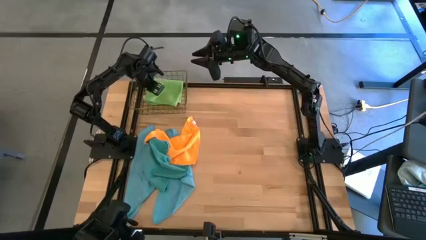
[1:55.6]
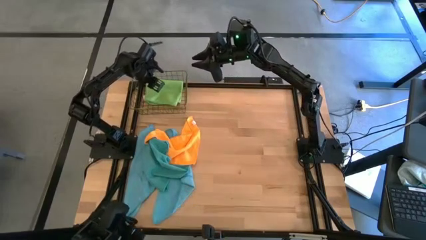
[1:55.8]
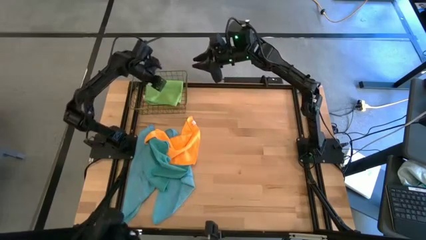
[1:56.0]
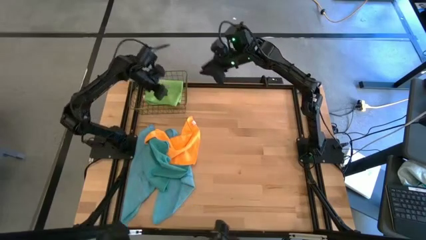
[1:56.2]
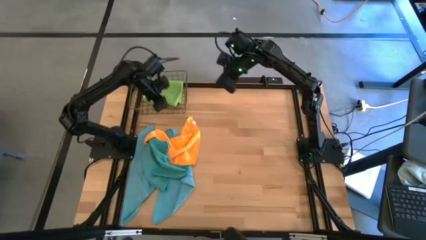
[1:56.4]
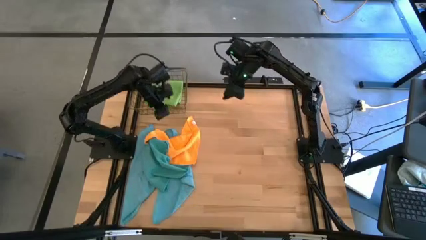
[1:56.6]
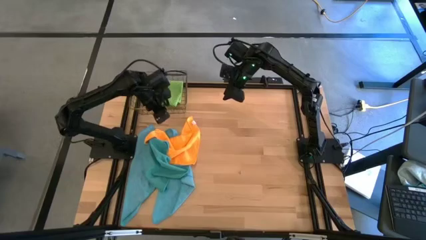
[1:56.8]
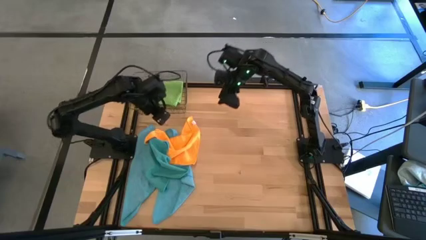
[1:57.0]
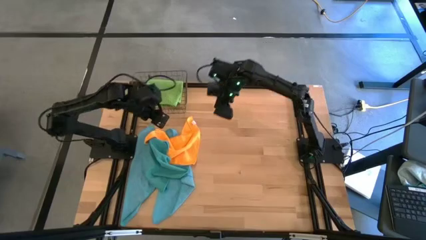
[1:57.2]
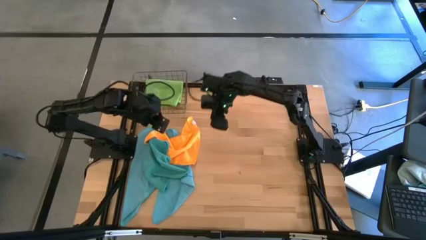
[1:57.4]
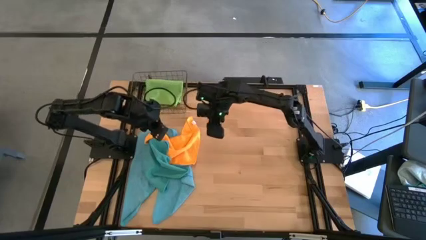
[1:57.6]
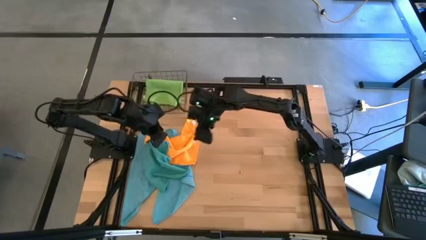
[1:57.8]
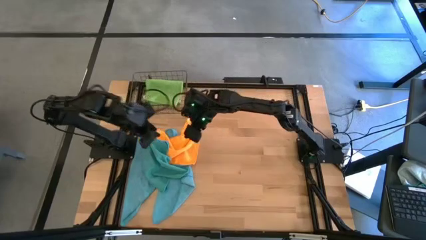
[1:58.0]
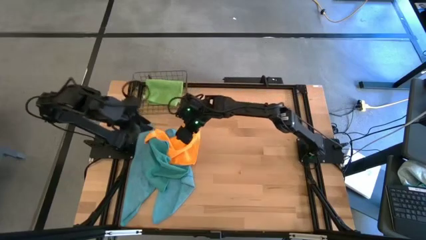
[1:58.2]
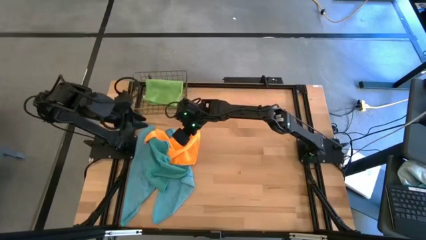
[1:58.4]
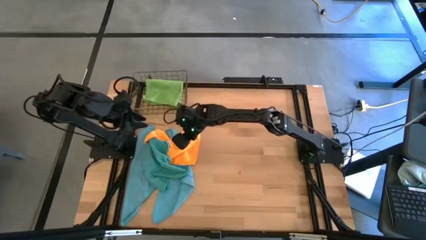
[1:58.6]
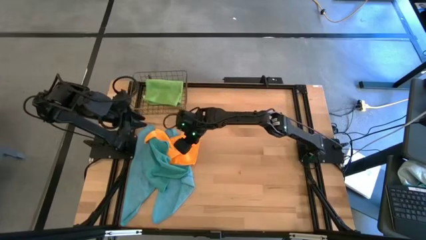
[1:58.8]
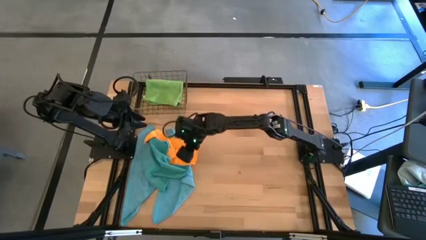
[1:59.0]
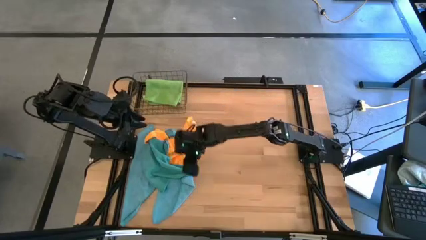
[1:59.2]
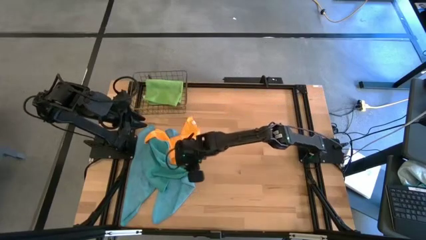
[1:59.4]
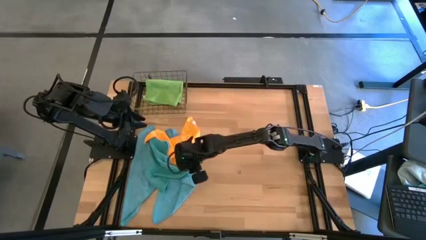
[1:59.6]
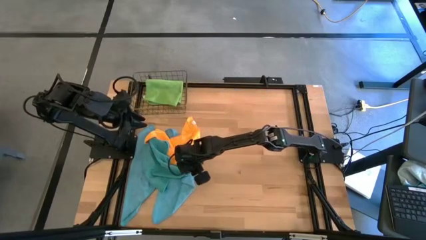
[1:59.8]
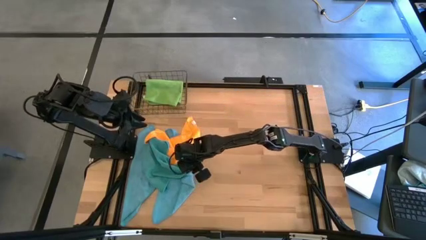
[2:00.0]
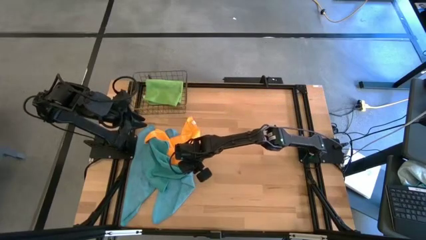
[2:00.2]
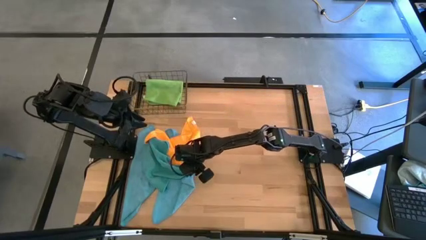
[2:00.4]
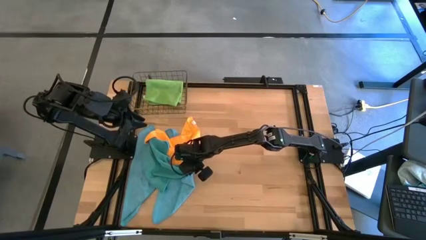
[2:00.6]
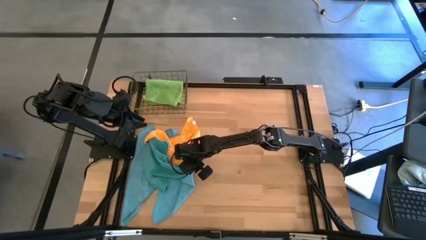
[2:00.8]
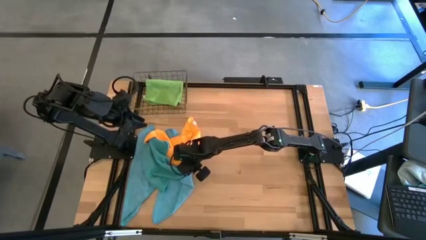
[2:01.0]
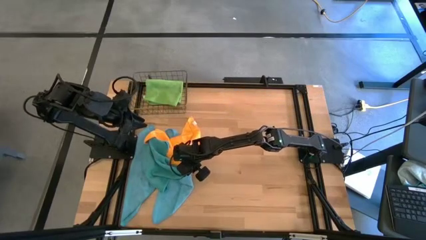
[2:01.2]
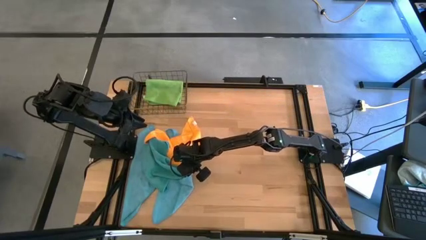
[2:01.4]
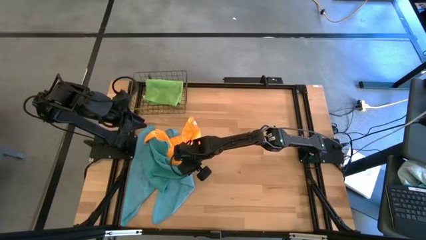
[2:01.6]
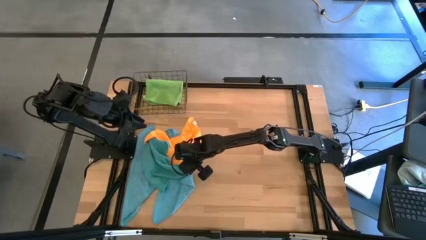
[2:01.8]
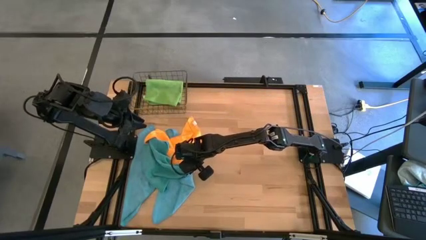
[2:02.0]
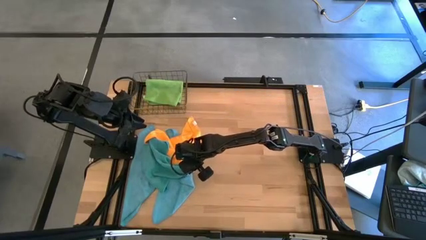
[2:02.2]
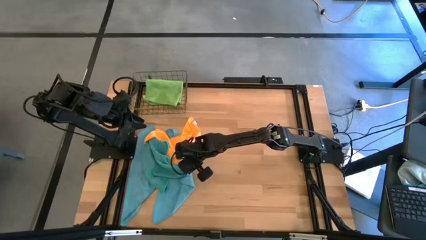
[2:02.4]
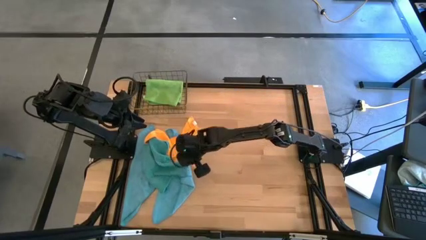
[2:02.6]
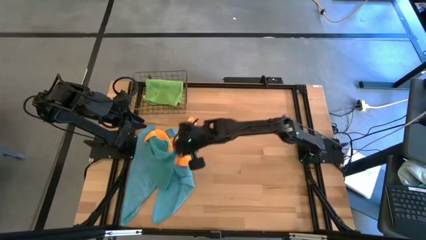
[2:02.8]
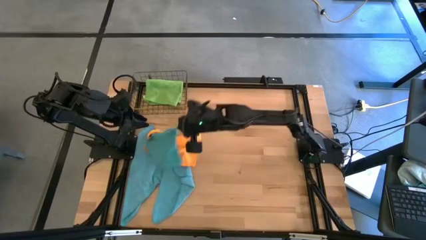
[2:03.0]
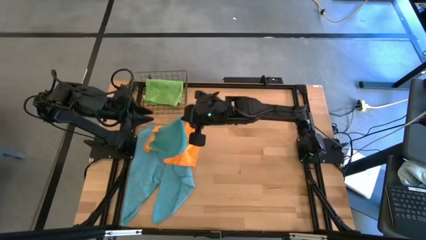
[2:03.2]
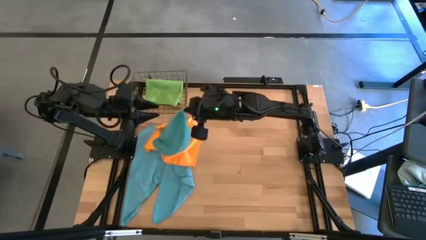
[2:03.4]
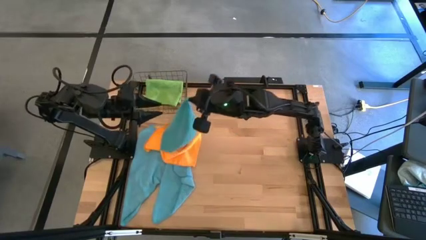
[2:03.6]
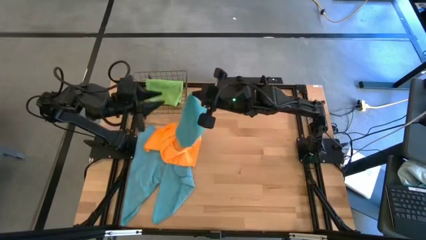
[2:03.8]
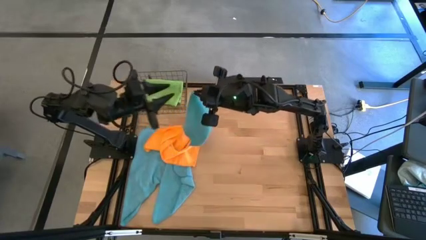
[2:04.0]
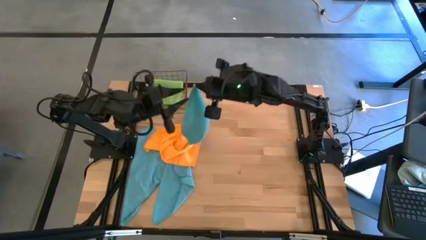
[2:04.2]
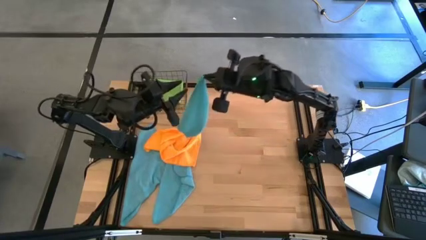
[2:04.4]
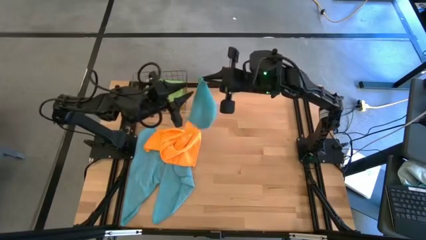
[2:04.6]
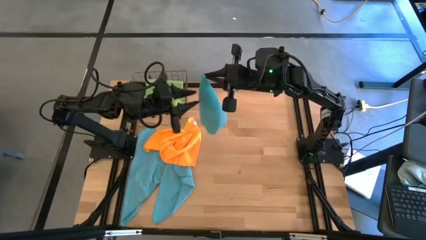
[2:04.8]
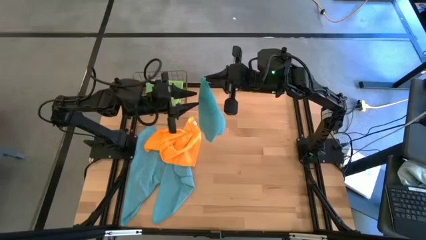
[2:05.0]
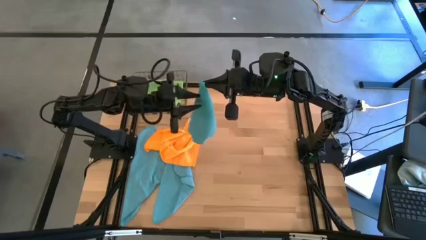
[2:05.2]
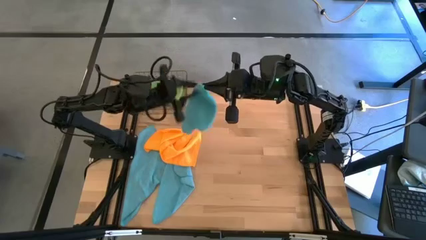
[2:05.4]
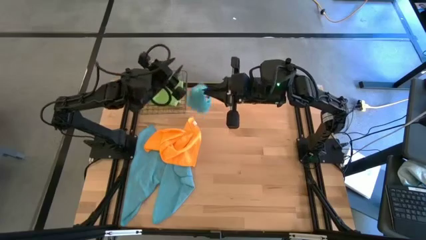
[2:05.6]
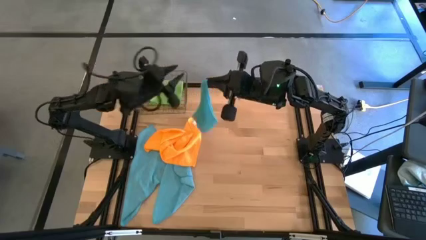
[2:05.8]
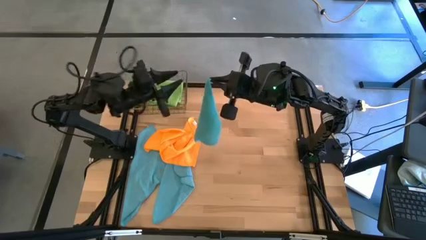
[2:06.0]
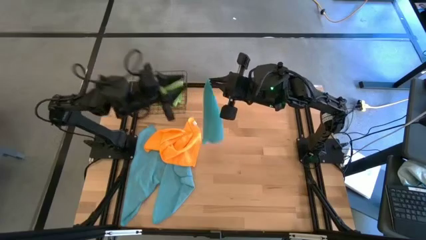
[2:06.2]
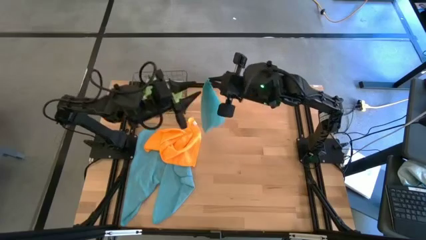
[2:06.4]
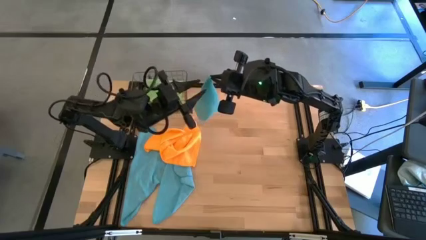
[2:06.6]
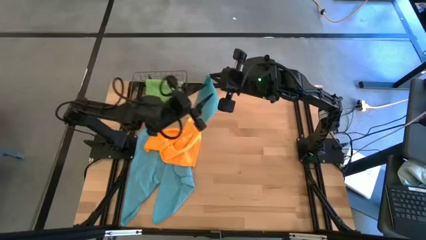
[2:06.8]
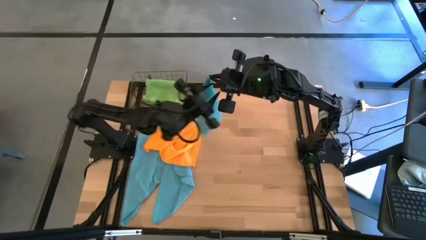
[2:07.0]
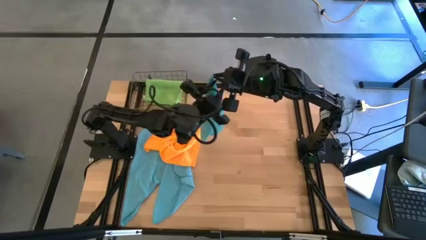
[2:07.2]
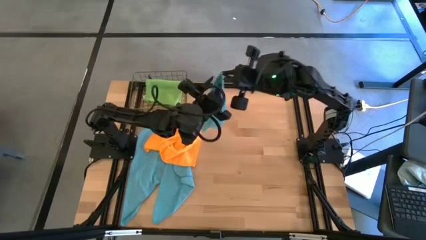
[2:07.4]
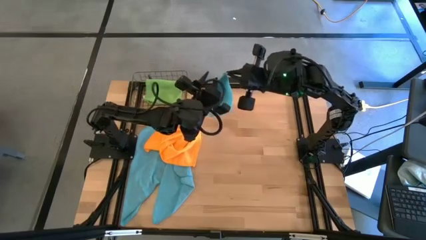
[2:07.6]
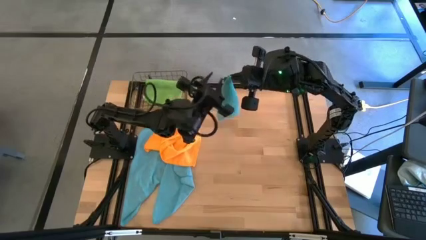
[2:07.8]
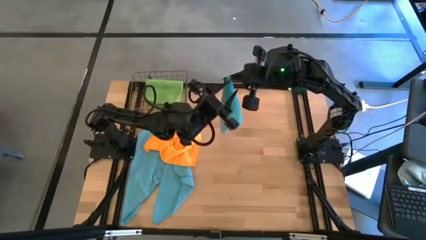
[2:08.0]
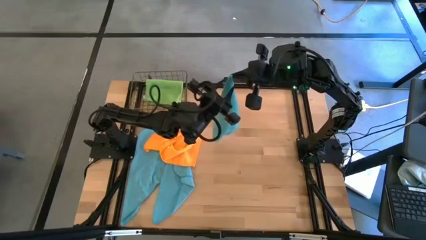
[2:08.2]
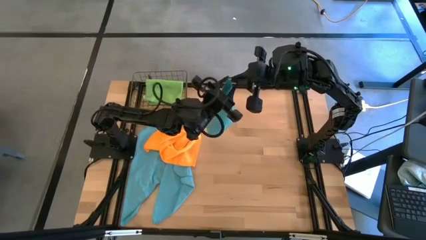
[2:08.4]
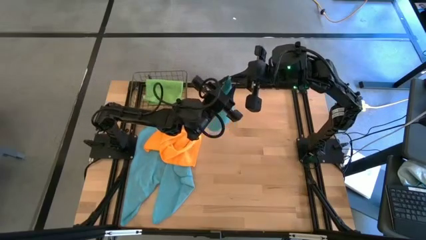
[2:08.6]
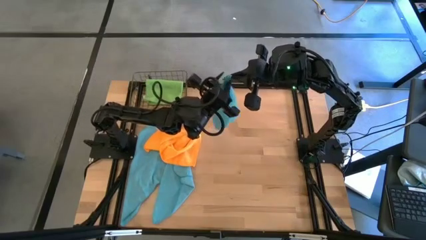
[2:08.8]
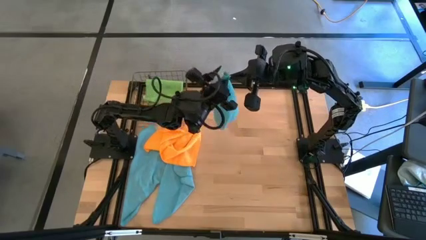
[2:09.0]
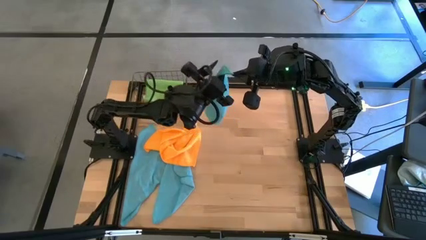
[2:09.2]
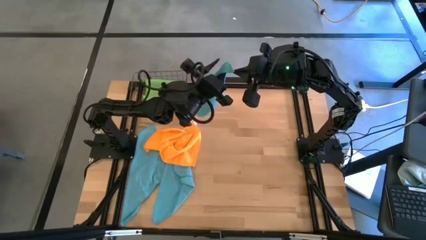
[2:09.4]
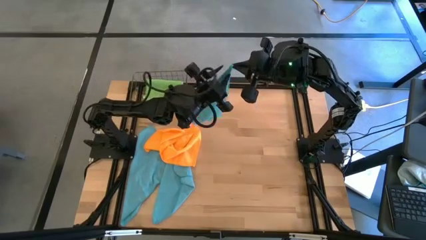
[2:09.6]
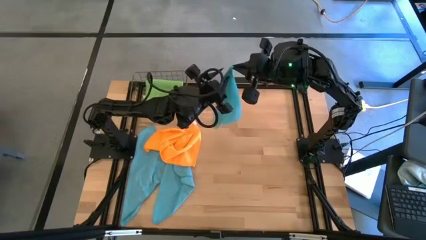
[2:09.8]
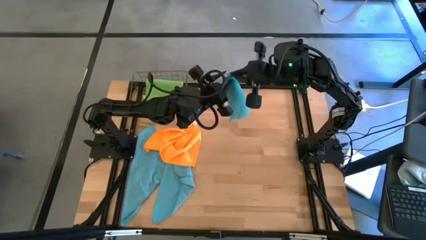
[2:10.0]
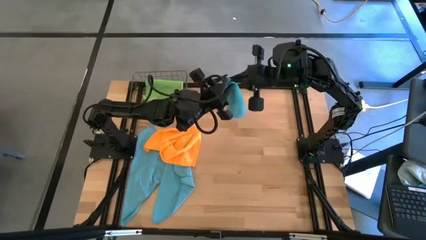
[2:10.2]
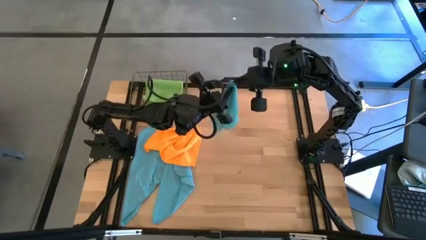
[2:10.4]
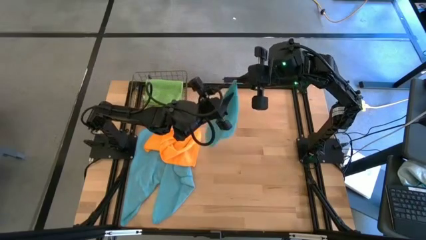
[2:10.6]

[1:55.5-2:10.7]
Task: Fold microfiber towels
Fold the blue microfiber cloth

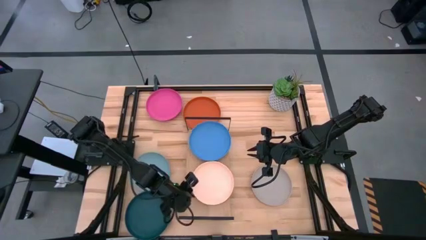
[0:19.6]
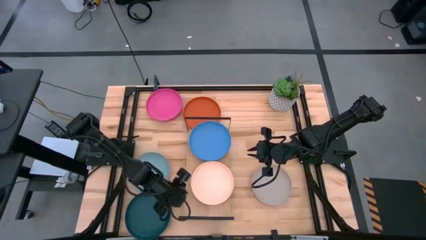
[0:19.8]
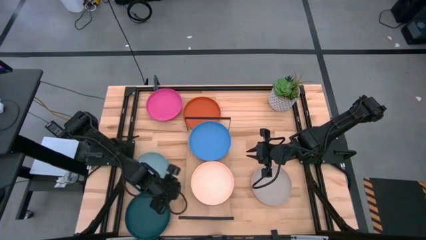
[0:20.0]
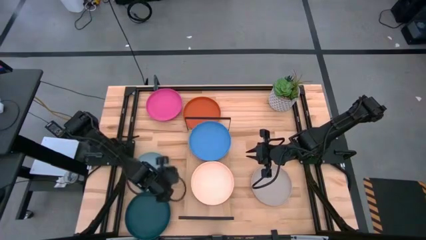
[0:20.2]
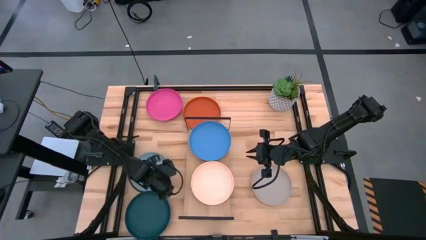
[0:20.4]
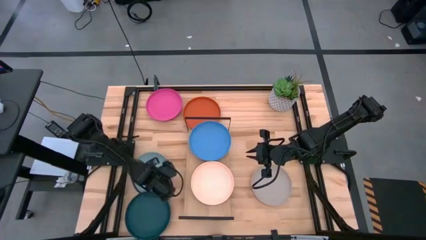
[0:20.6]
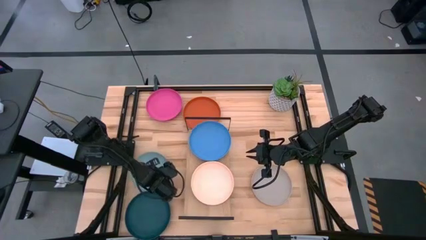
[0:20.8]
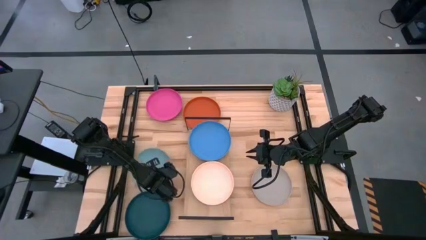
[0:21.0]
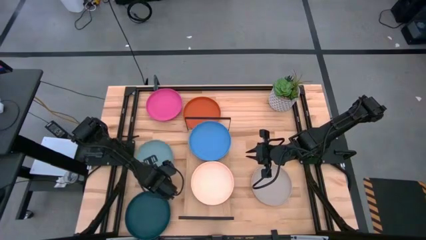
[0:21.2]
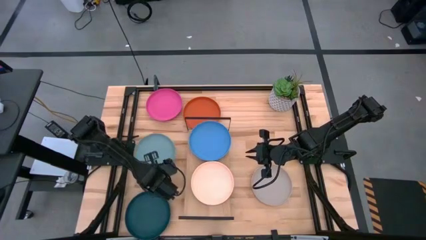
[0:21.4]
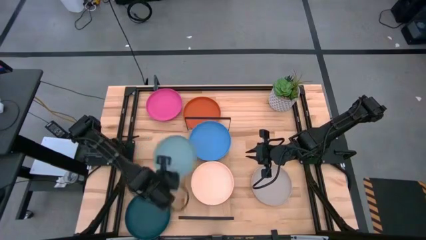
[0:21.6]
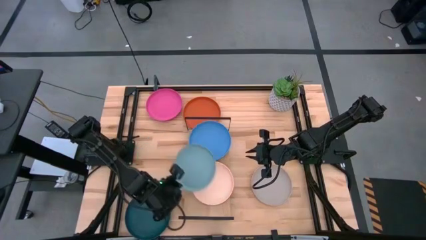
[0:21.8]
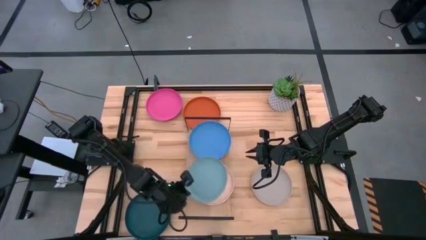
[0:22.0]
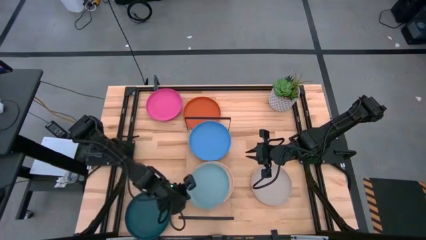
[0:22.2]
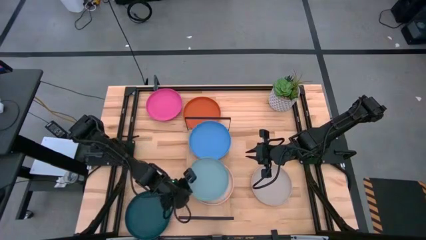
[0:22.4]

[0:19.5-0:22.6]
Task: Place and stack plates onto a shelf
Stack the light blue plate on the top of the light pink plate
